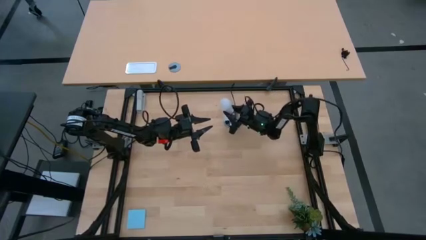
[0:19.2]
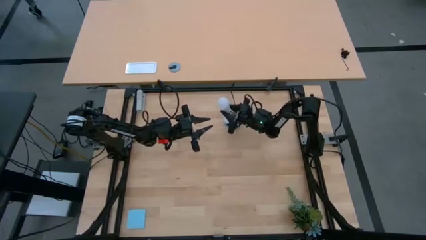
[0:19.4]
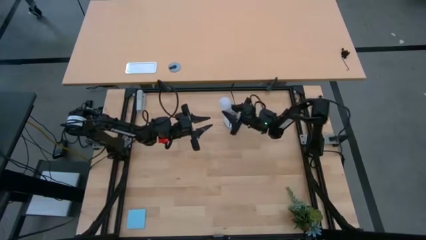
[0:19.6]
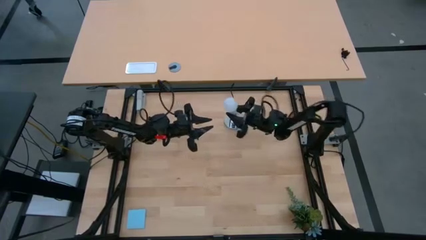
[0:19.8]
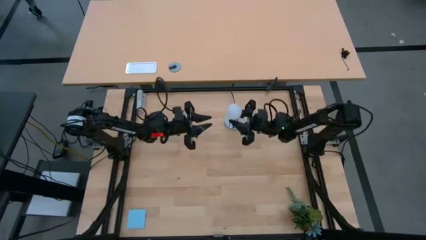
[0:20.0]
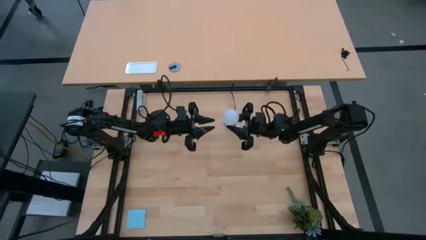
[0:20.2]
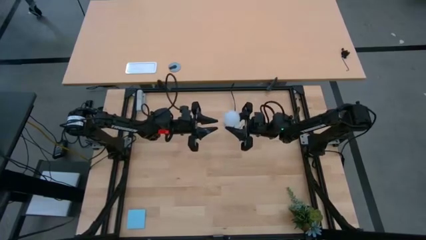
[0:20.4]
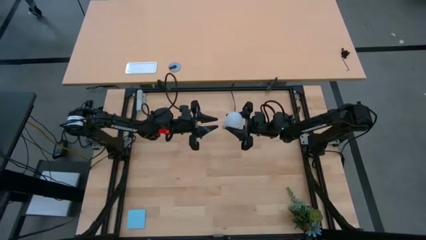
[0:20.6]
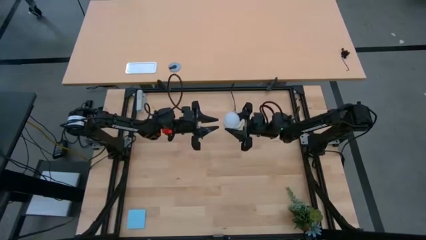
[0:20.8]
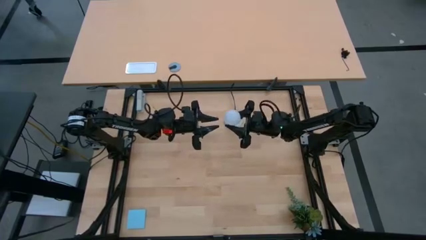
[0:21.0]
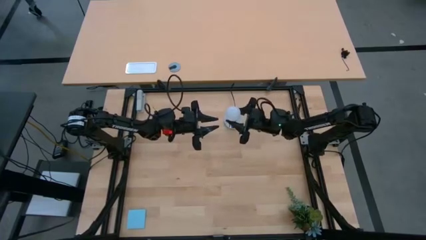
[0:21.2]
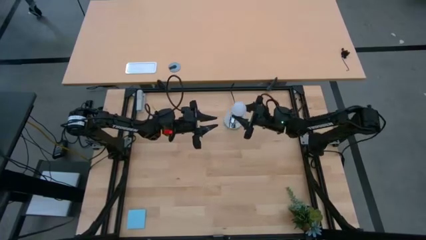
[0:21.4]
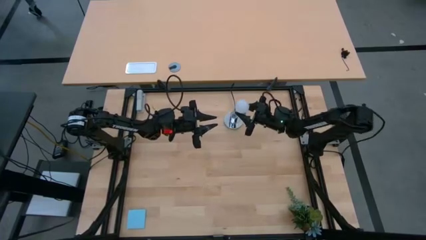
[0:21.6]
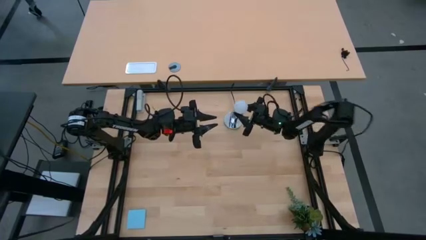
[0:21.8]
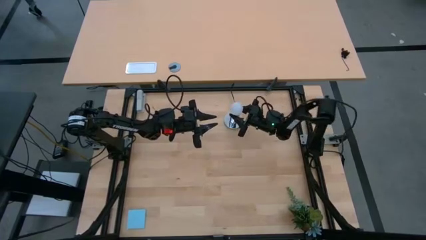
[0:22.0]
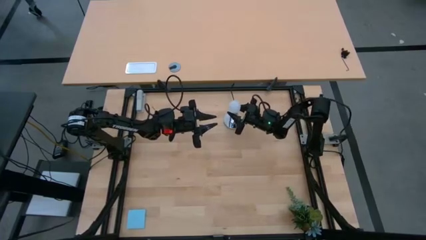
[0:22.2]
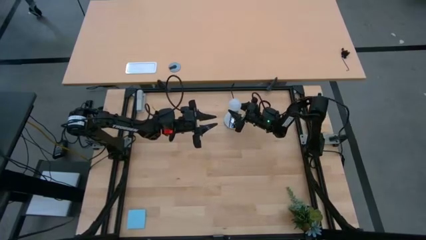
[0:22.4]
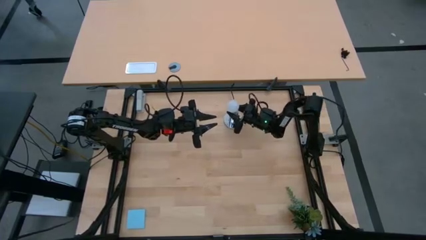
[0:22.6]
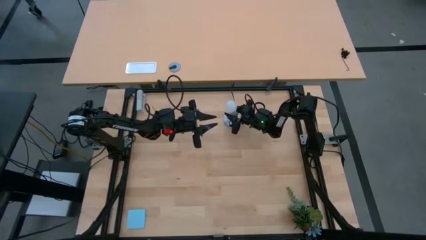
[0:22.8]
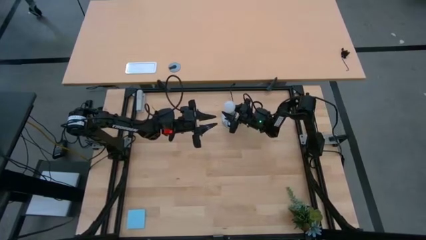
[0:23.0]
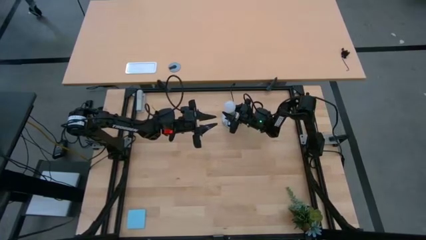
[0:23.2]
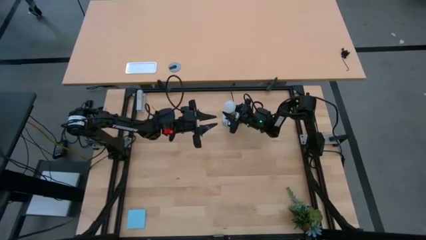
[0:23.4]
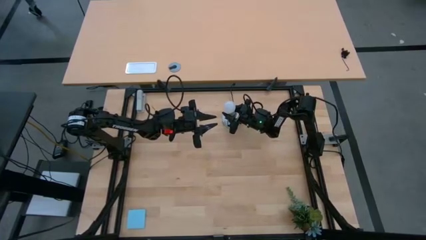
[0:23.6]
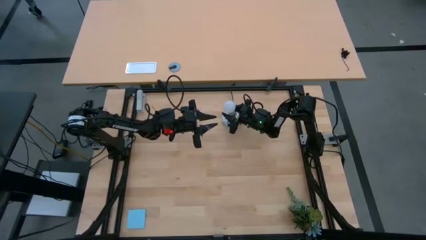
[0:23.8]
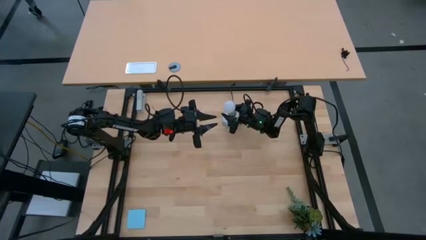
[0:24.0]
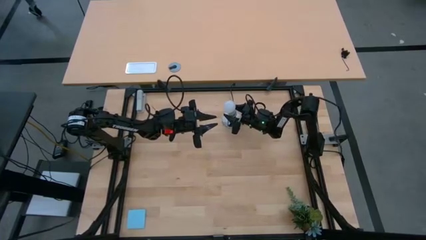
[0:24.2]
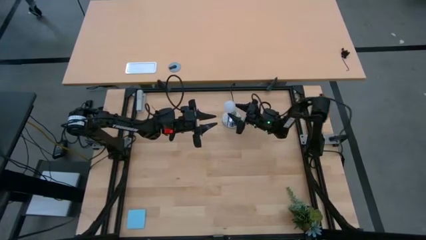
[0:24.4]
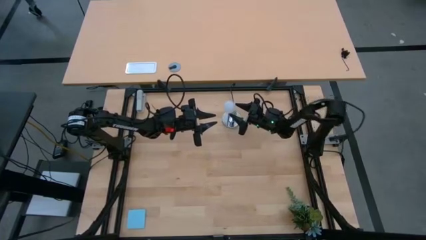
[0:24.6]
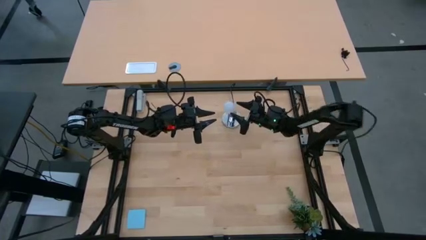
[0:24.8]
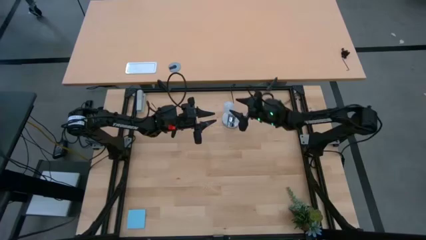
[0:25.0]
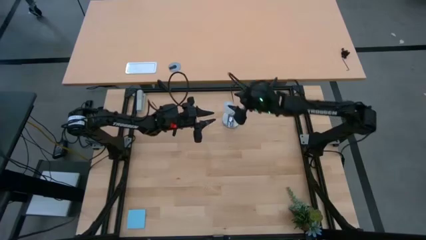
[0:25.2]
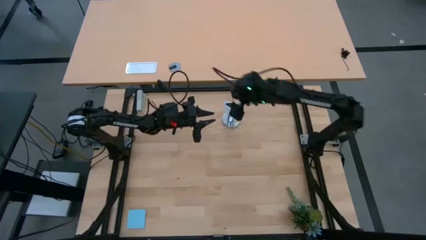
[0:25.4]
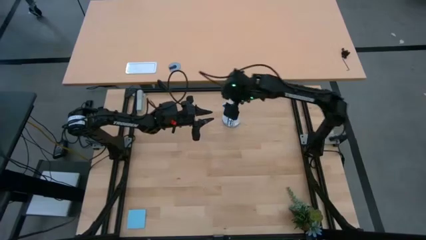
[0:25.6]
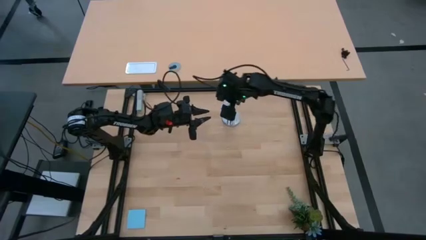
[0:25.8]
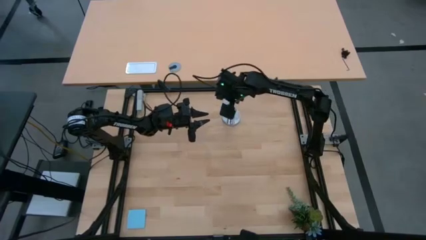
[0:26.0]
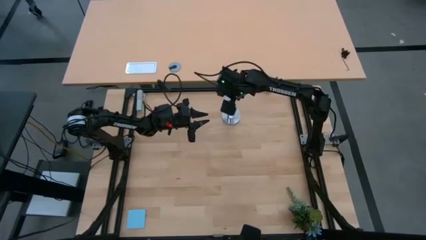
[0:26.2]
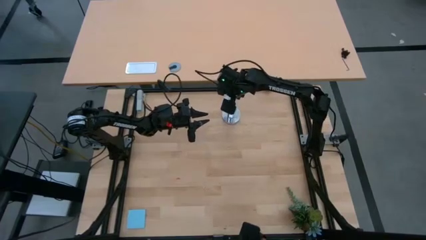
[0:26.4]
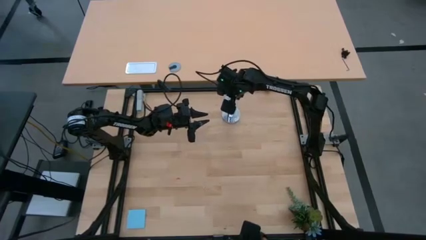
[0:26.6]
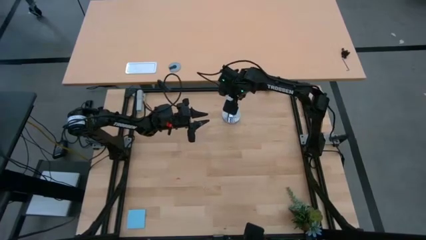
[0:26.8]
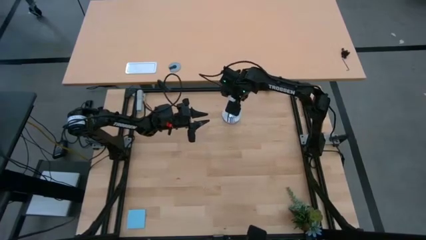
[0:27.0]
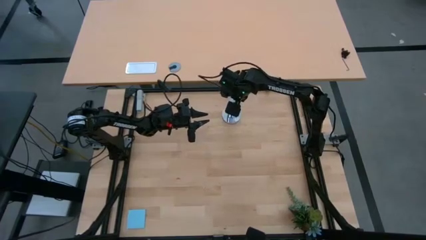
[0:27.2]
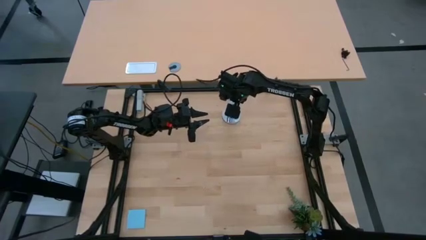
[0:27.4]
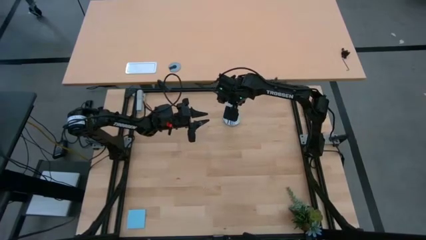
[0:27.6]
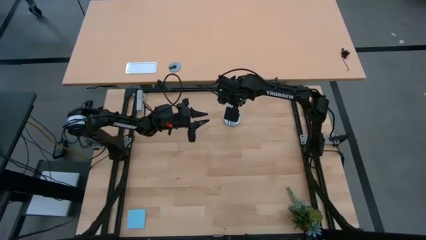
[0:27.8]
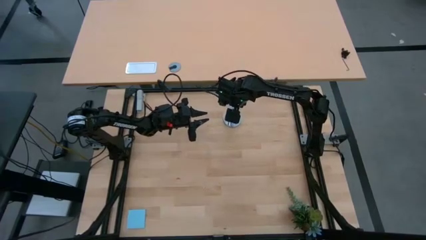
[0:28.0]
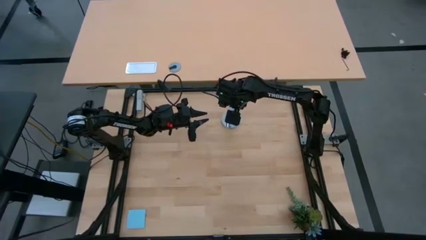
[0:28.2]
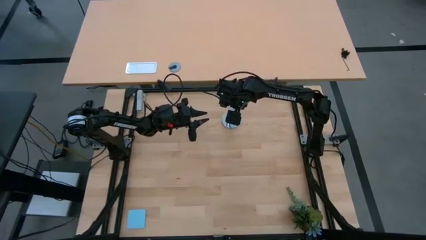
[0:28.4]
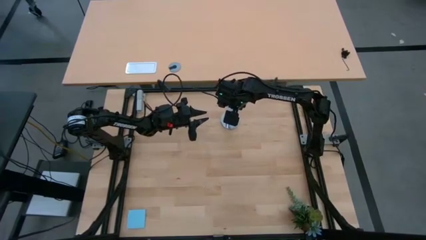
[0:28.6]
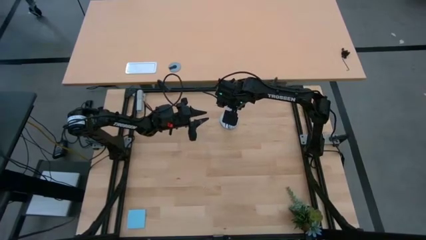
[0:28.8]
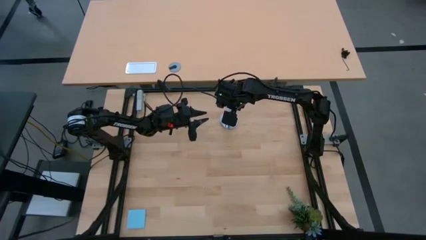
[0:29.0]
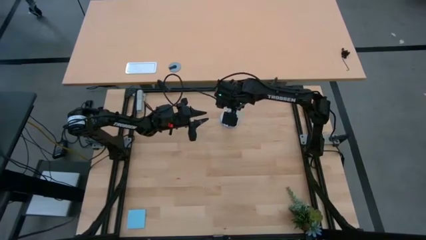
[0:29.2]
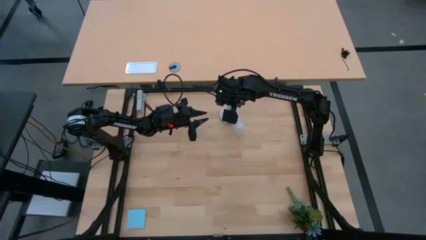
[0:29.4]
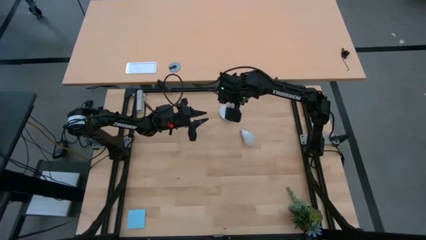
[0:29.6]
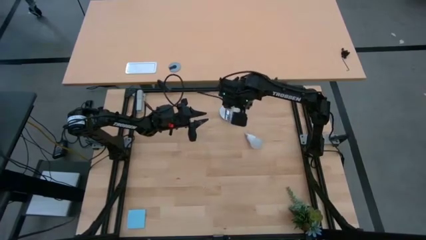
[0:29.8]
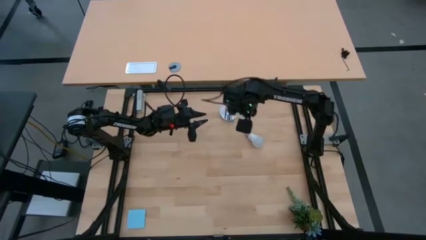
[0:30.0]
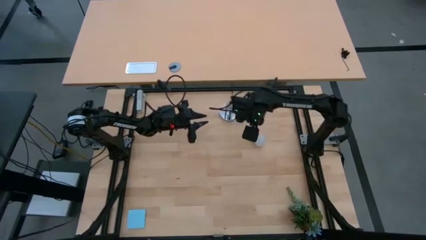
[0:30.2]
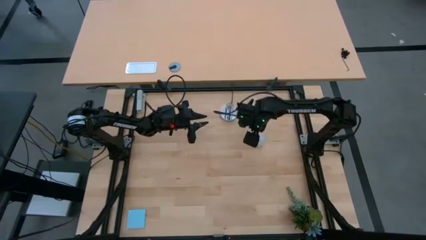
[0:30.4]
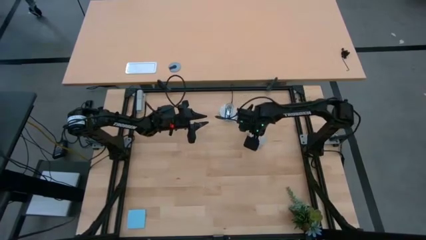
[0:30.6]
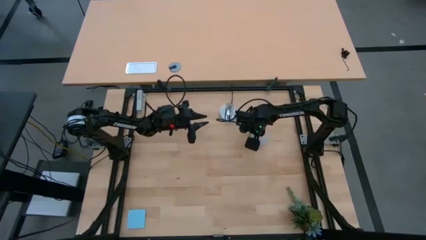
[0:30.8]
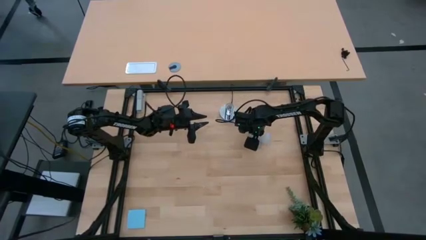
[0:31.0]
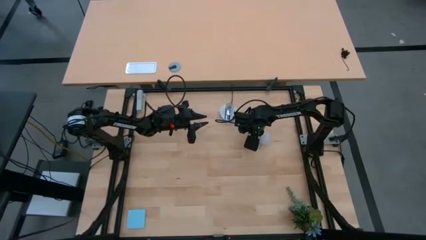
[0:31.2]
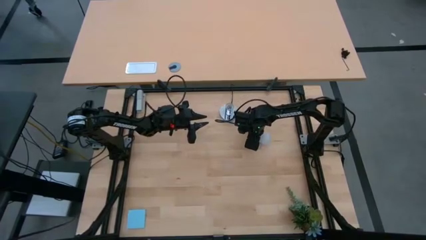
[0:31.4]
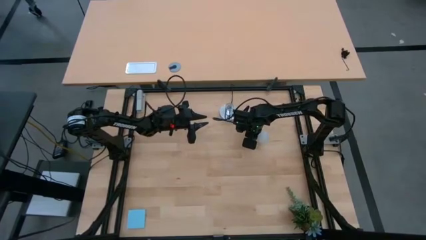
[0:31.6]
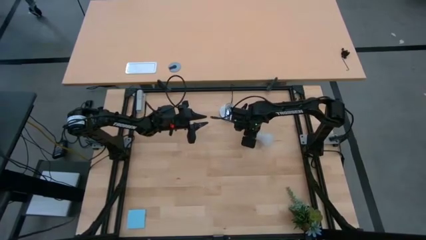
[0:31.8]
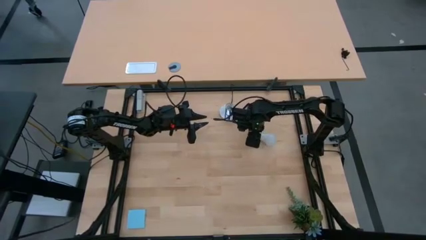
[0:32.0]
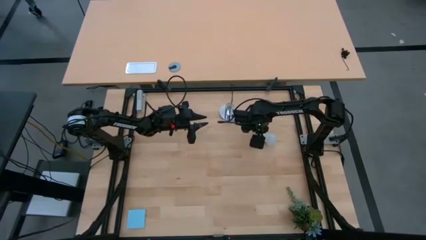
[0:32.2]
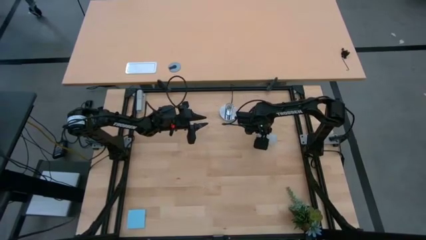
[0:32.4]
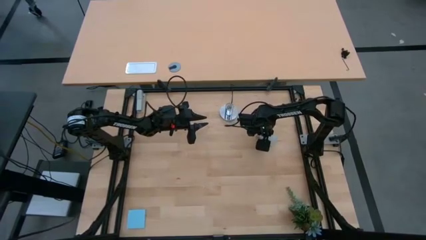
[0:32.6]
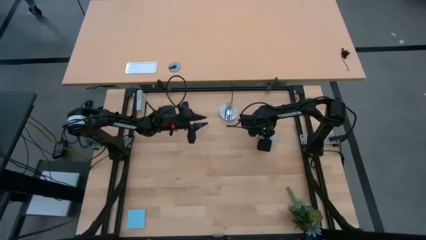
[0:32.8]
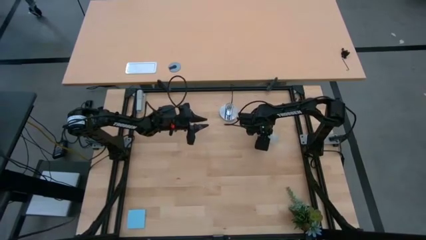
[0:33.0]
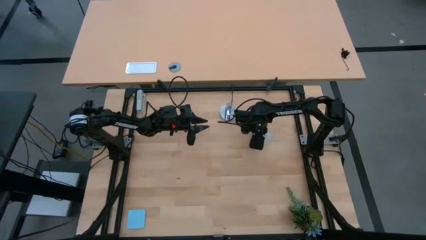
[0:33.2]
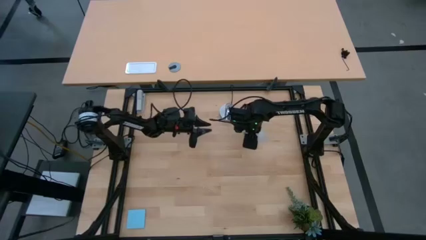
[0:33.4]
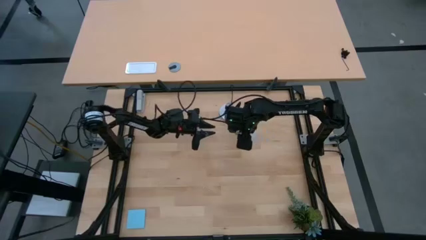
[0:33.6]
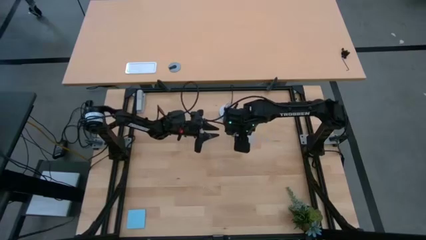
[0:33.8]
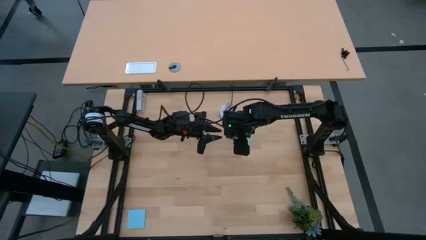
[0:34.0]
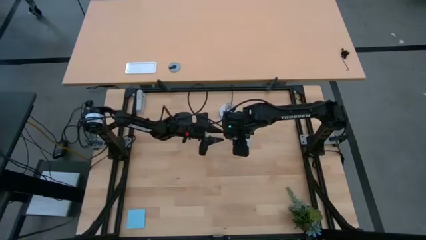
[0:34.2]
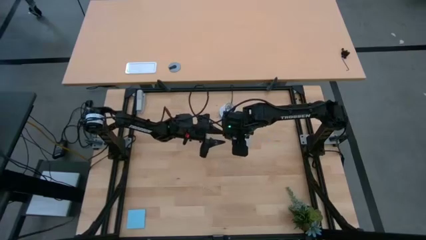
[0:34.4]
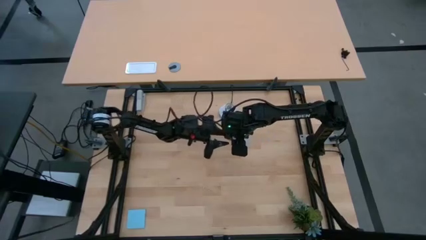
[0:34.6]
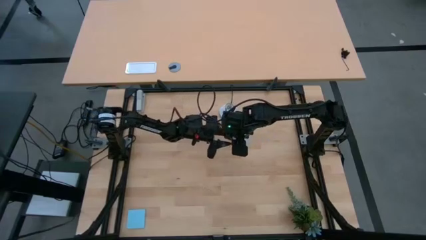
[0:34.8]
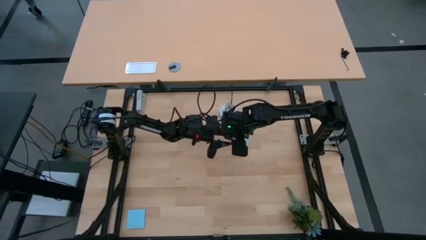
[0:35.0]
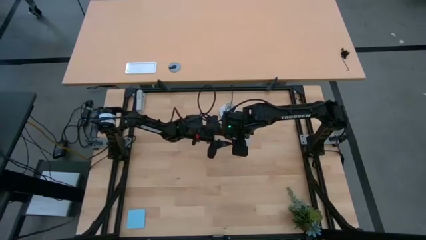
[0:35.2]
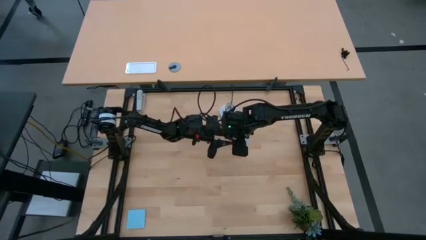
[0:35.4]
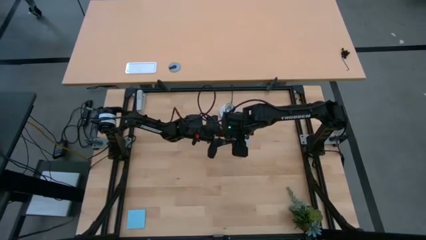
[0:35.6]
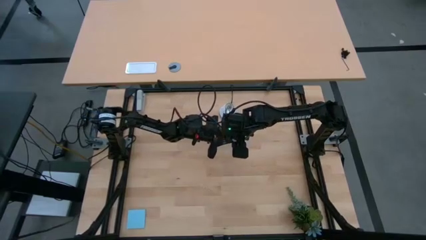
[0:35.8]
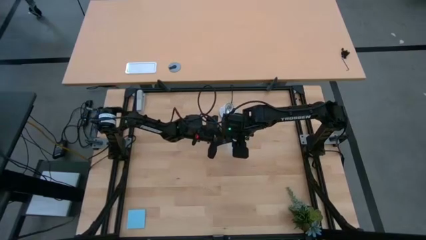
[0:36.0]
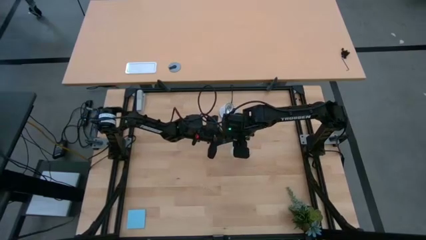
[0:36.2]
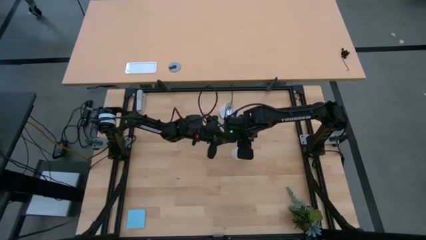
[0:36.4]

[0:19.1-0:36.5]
Task: Screw lightbulb
Insert the white lightbulb into the silver lamp
